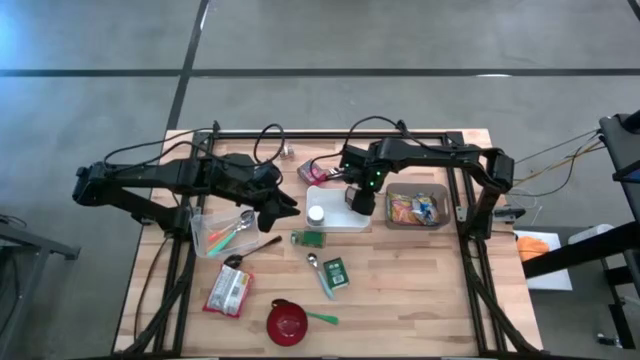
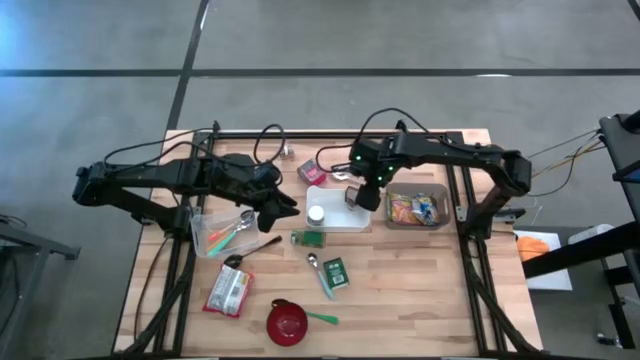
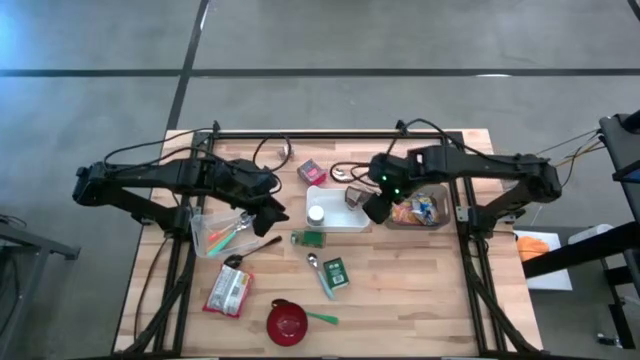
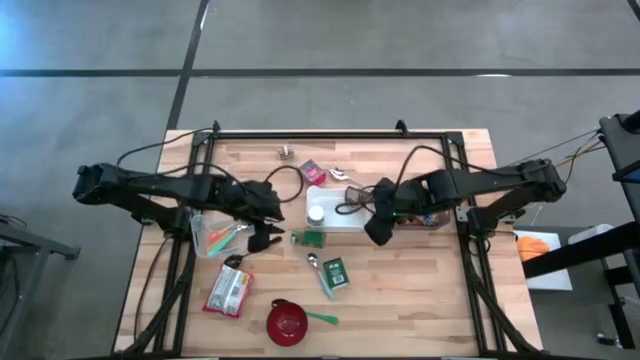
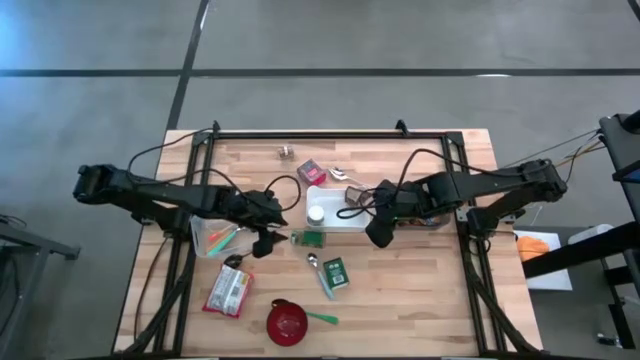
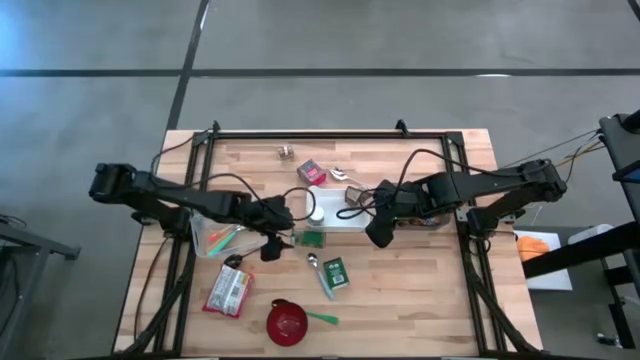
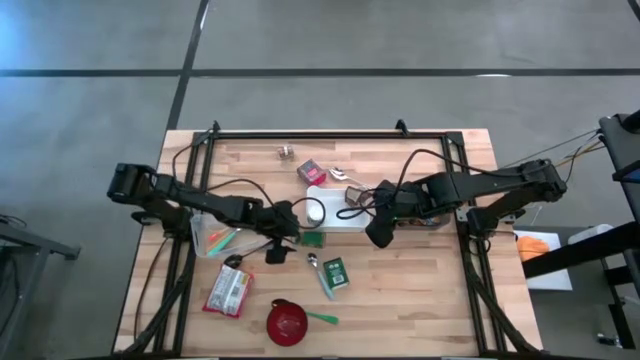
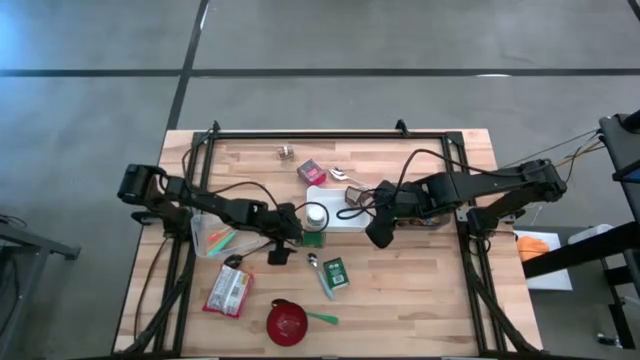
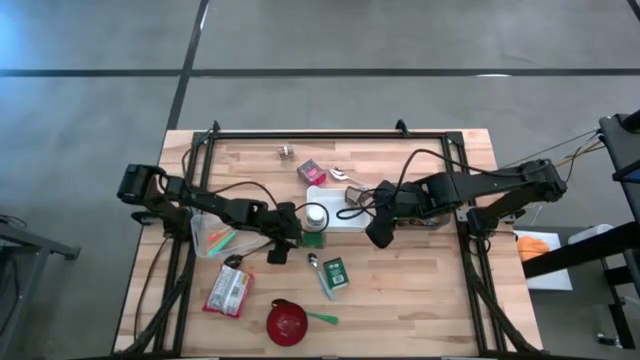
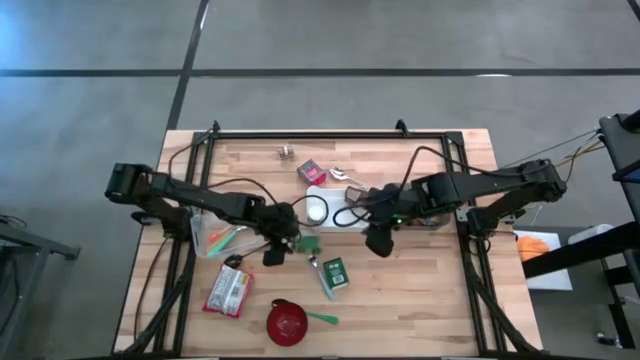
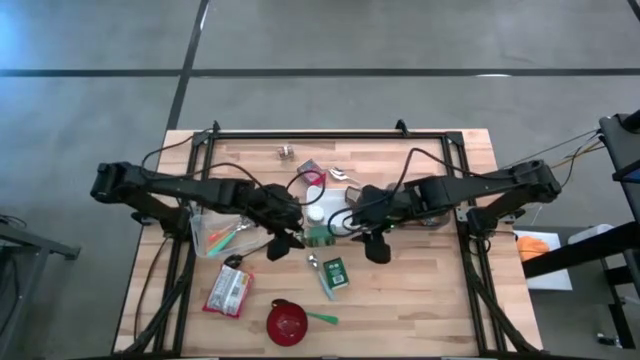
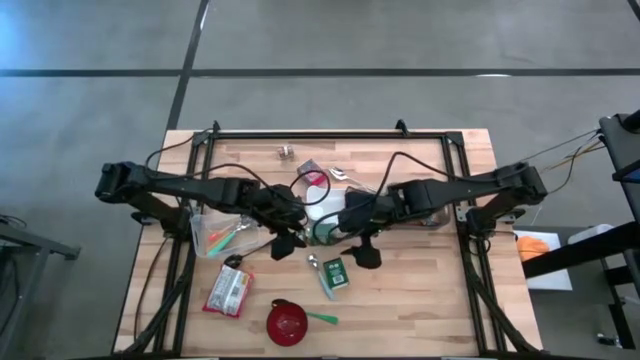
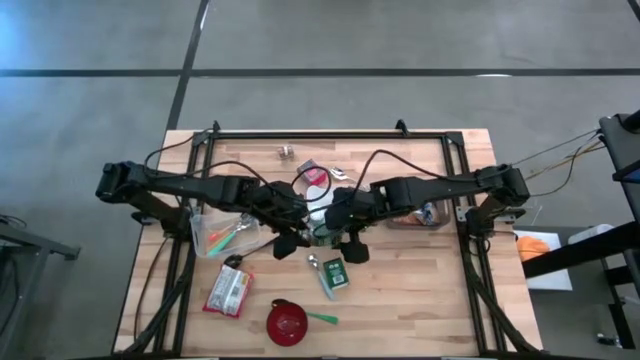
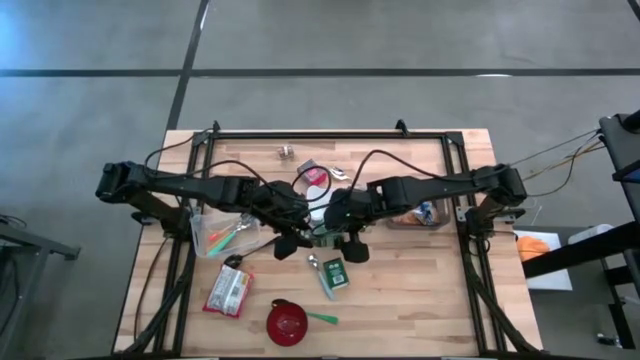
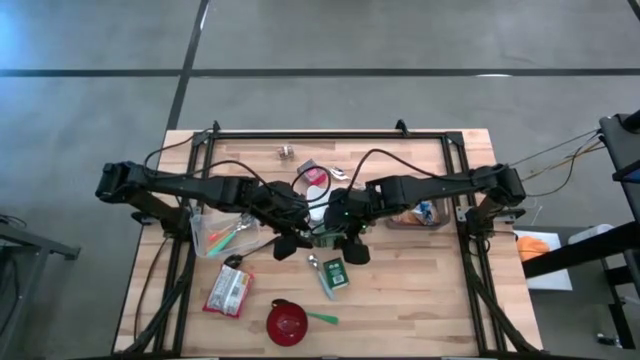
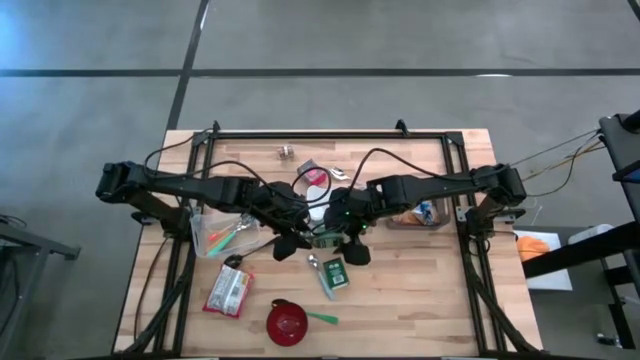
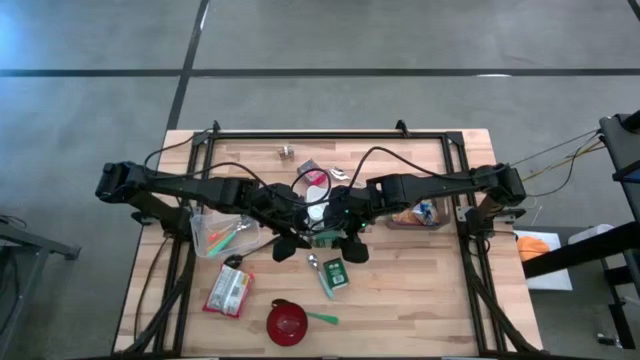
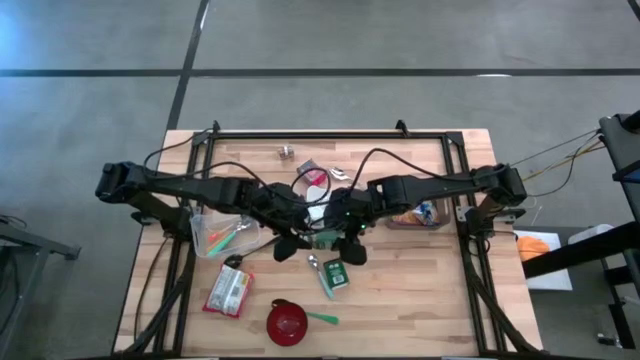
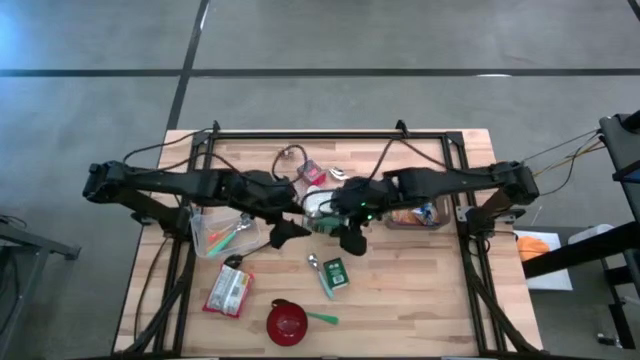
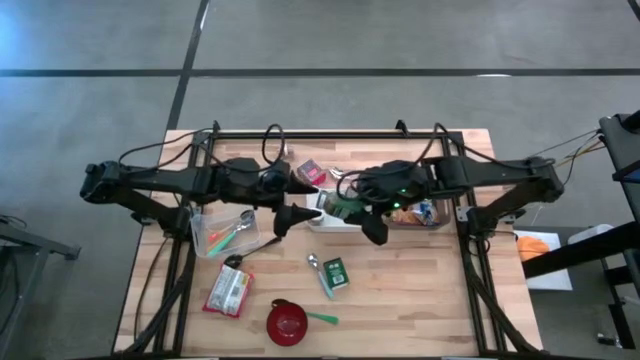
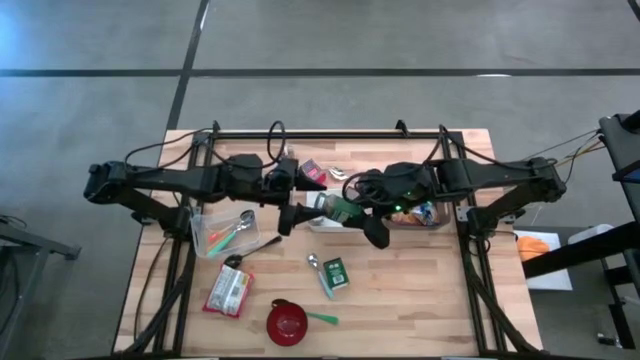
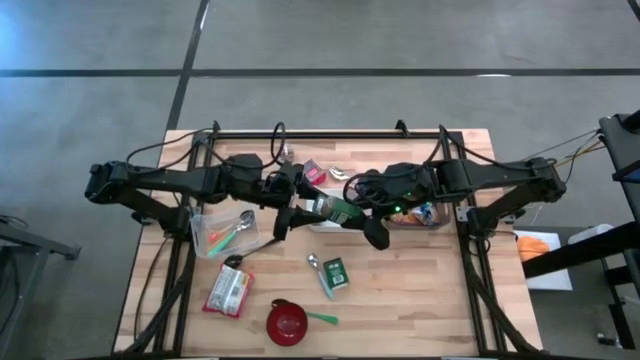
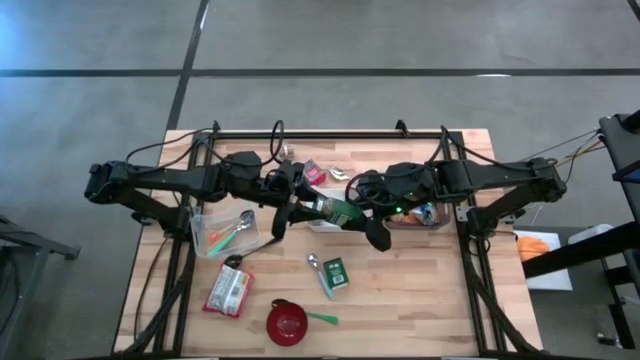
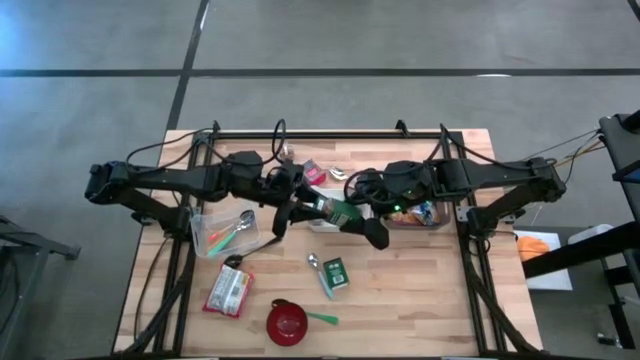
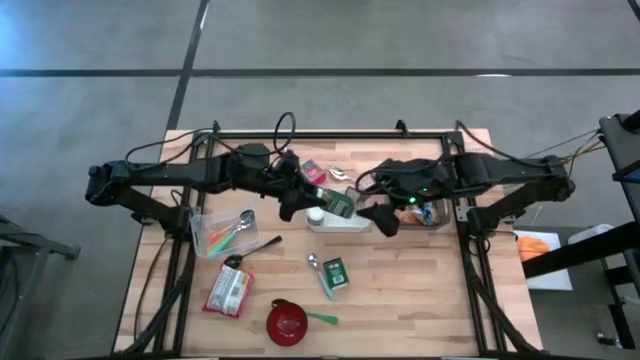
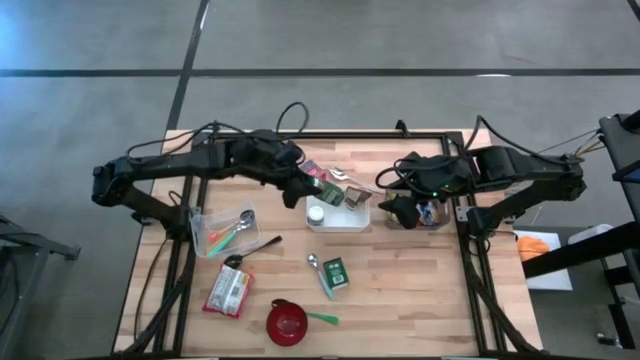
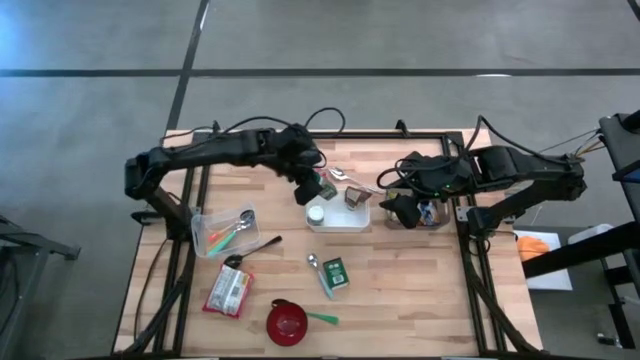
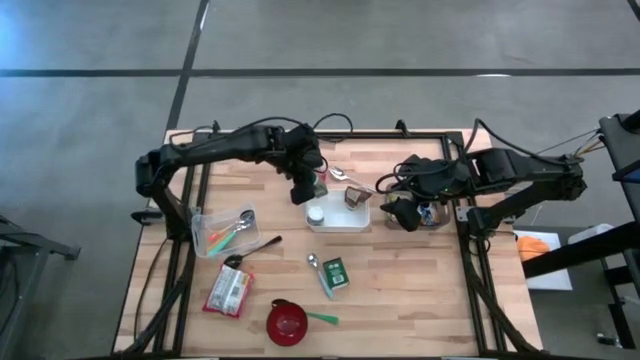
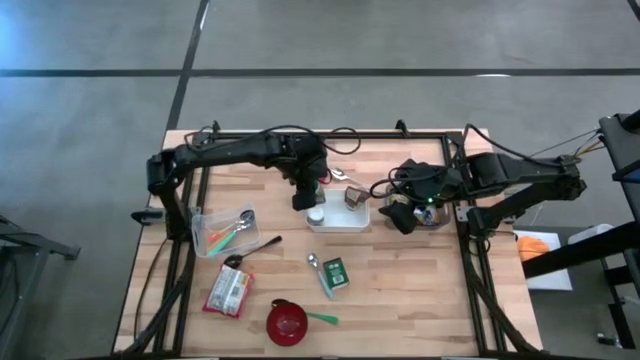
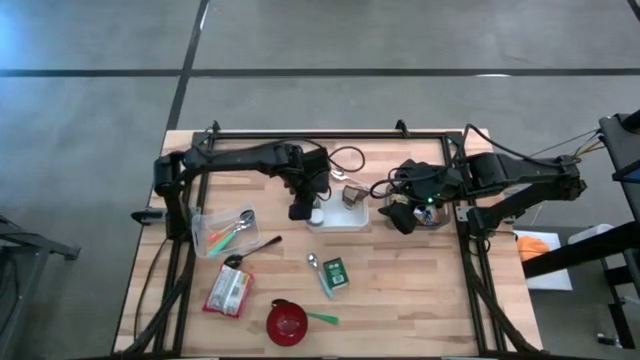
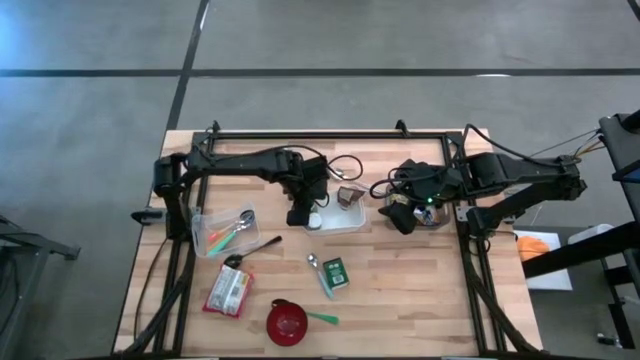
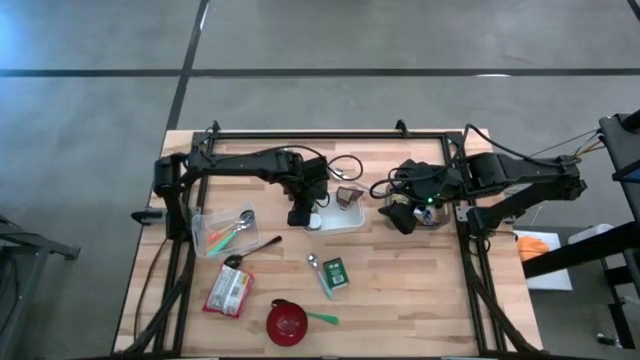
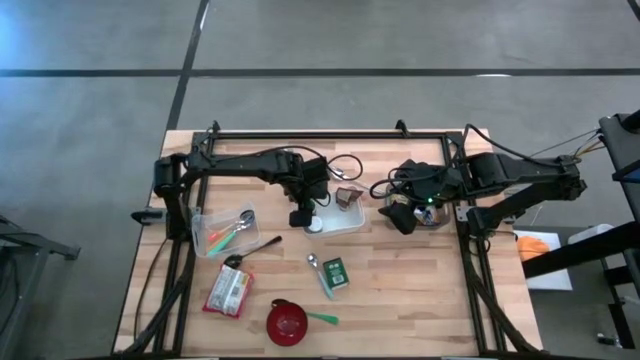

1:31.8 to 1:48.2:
Put the green seasoning bottle into the white bin
